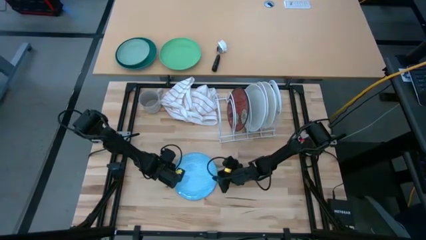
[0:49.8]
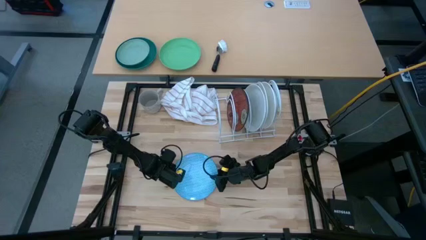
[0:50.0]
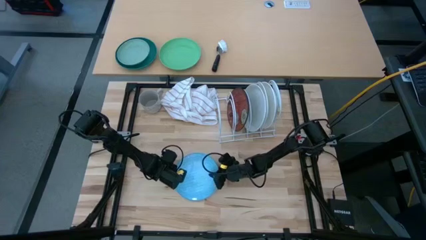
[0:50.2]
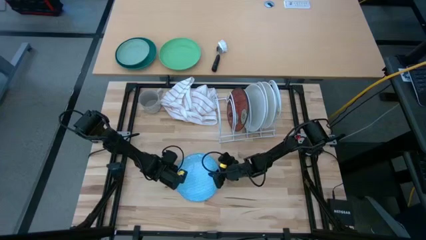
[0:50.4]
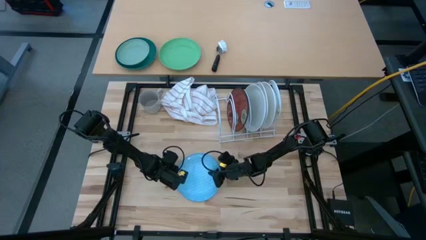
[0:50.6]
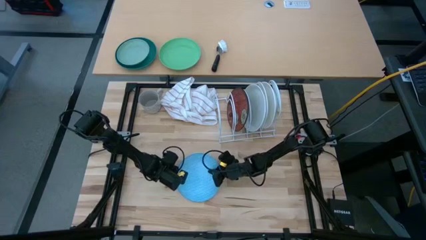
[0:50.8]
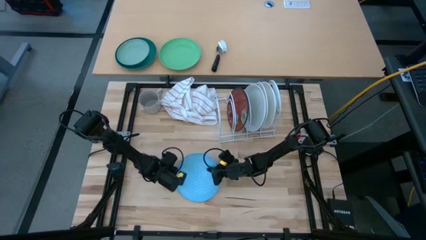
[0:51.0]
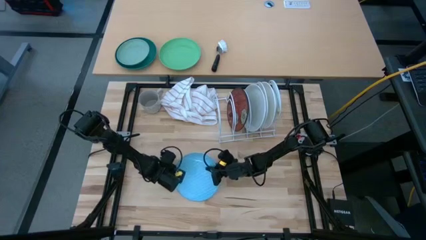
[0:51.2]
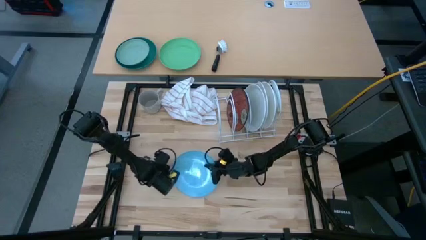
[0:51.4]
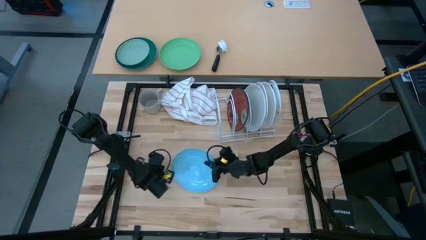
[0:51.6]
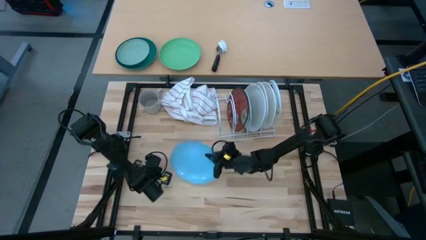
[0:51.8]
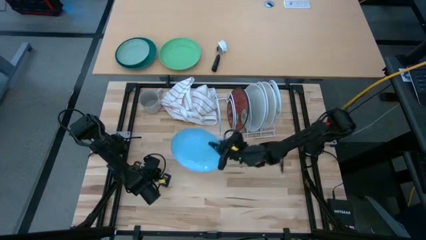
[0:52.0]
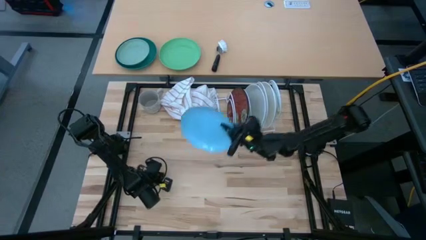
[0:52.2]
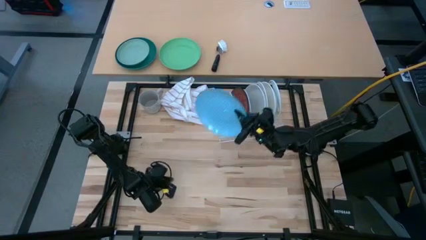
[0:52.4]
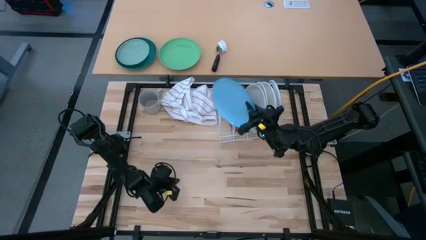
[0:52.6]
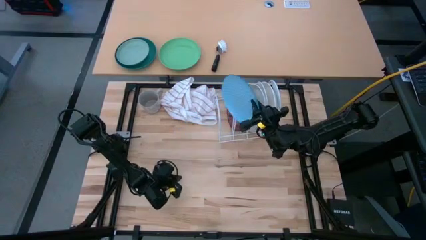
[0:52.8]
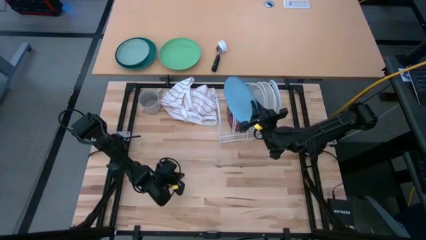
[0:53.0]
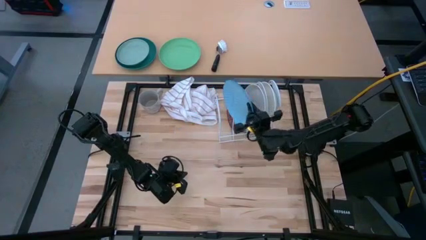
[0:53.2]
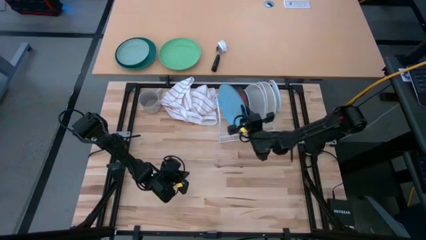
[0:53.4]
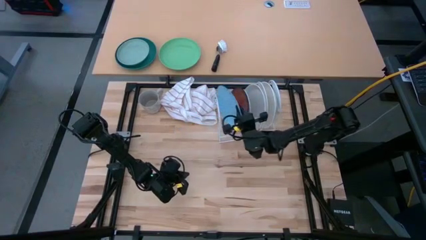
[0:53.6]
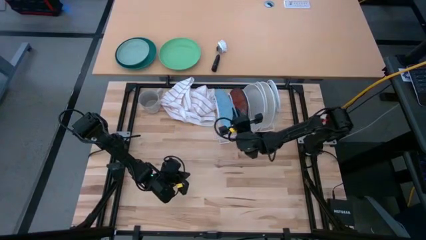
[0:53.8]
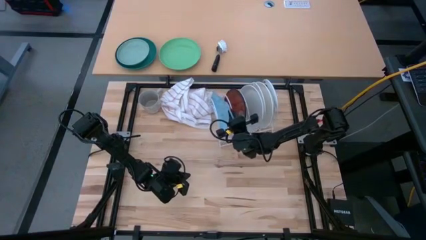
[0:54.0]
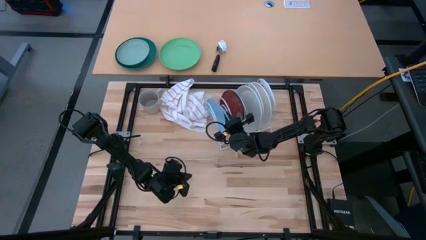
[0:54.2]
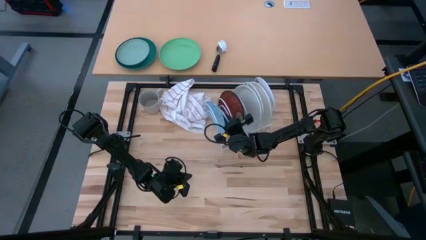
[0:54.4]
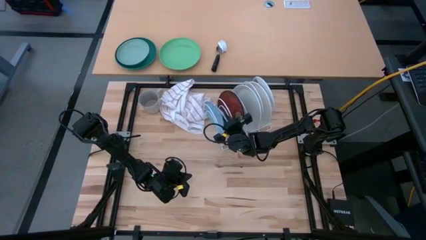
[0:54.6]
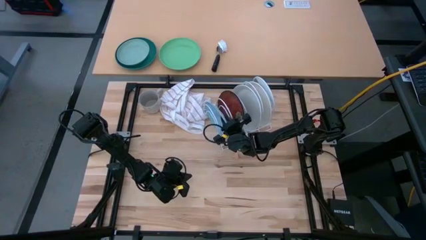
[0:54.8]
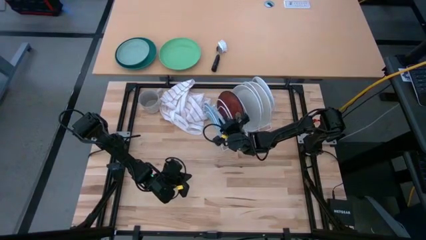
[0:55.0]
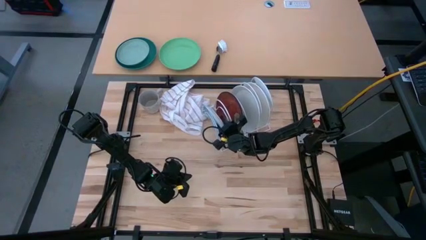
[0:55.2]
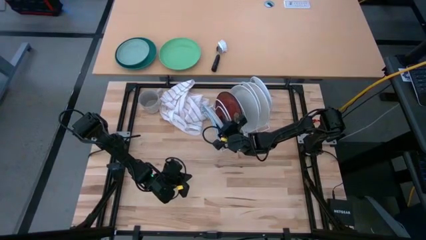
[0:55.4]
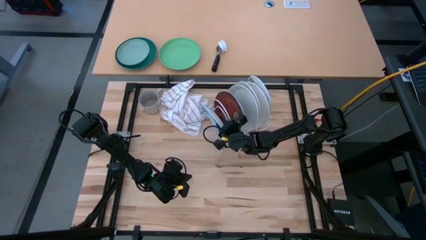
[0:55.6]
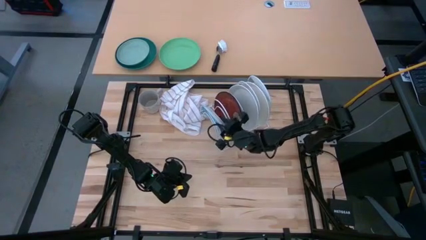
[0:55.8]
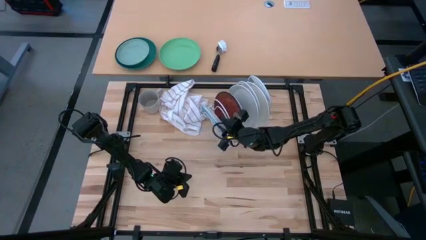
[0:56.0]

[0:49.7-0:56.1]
Task: Sort dishes
Put the blue plate into the white dish rack

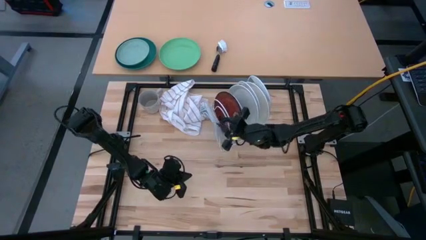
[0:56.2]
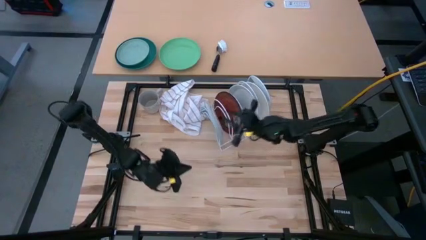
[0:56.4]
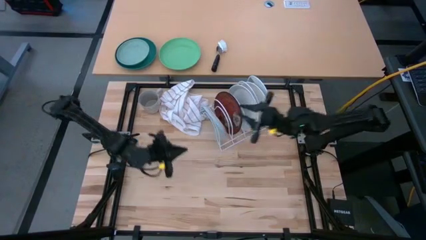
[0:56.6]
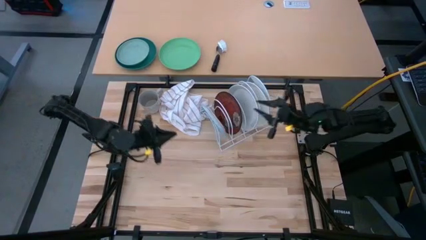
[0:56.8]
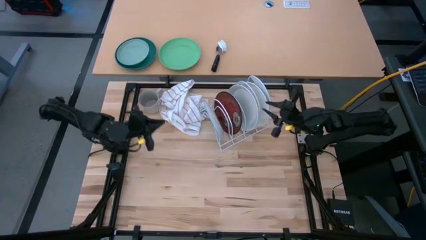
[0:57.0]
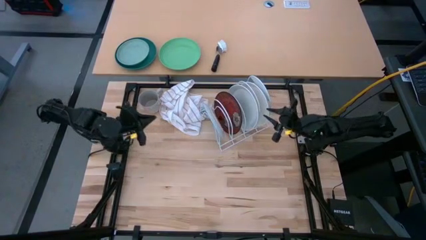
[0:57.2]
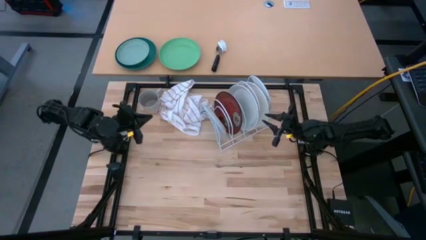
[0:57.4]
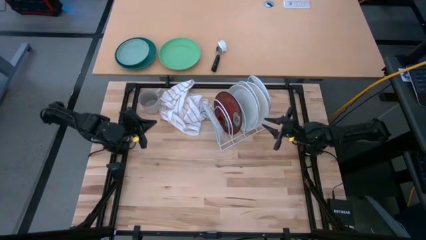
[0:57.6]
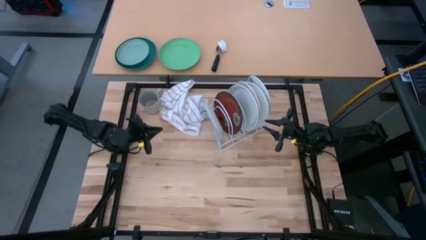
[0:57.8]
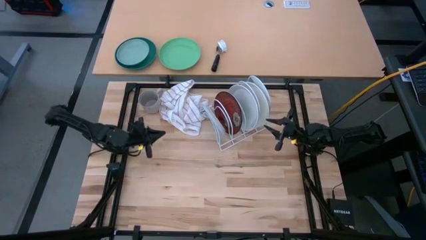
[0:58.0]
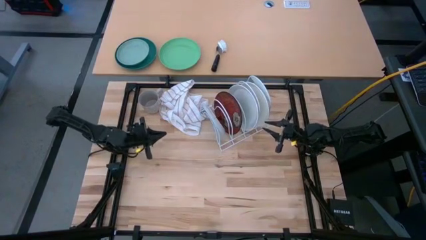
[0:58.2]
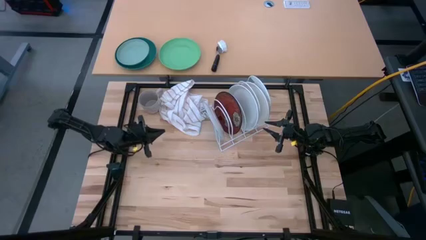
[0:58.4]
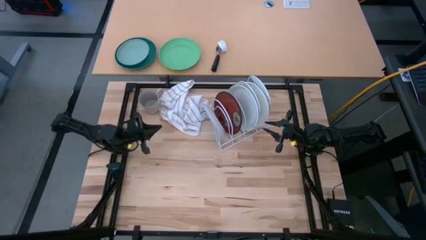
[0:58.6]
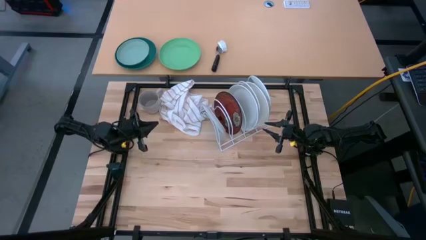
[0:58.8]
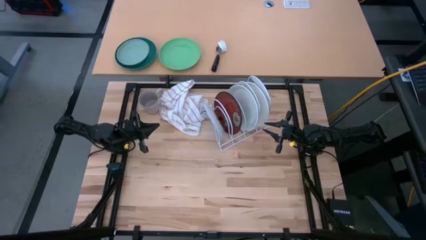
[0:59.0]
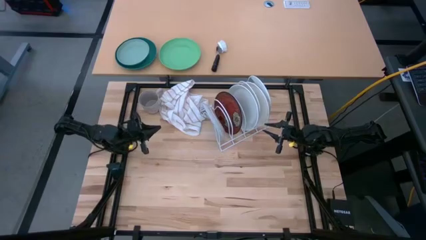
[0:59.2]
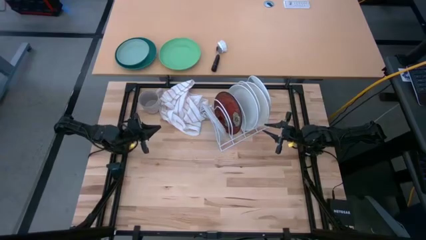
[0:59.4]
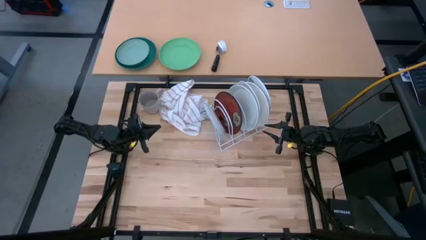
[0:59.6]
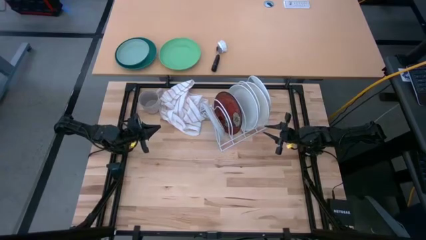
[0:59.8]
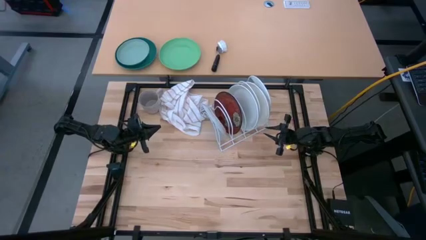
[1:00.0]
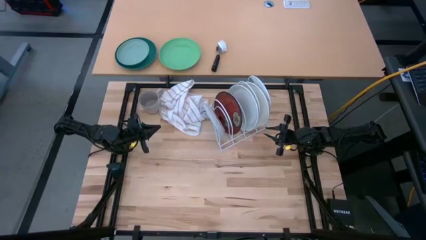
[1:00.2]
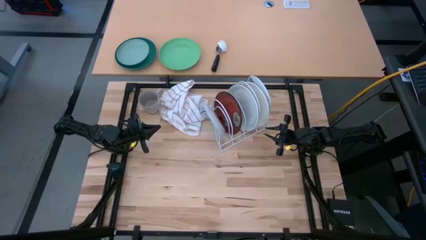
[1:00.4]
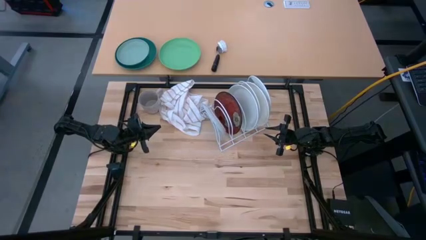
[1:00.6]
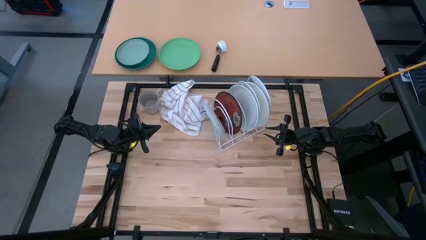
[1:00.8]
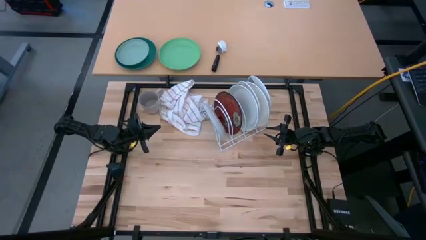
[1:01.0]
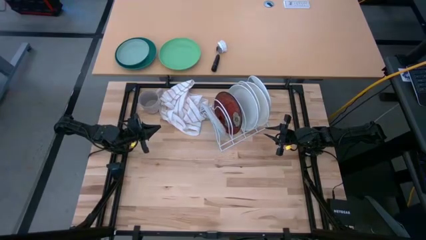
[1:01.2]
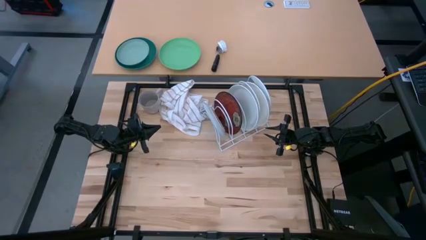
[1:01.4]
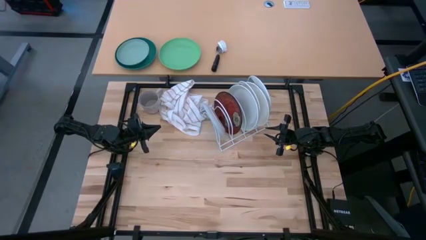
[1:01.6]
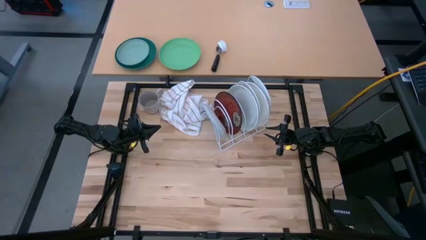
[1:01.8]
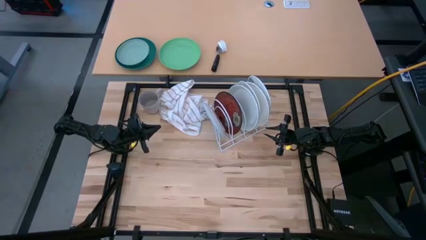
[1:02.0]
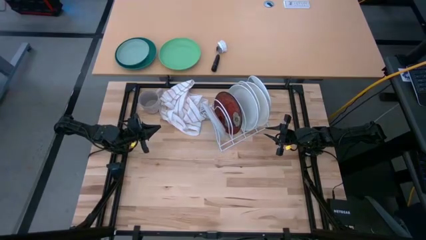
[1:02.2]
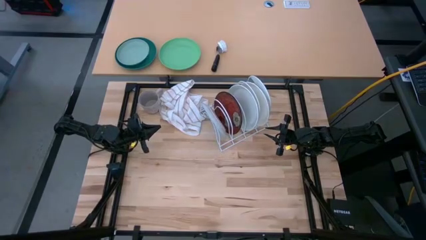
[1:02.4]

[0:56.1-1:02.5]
Return to Home Position
